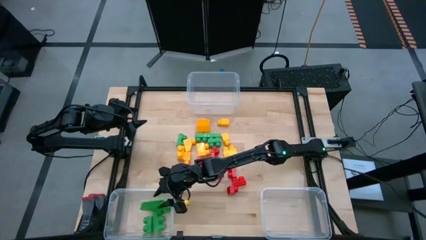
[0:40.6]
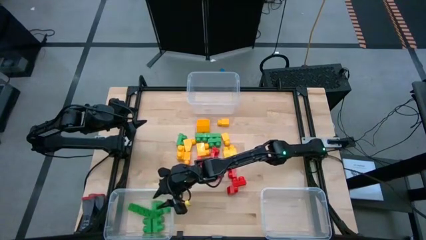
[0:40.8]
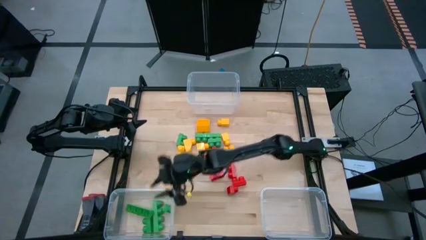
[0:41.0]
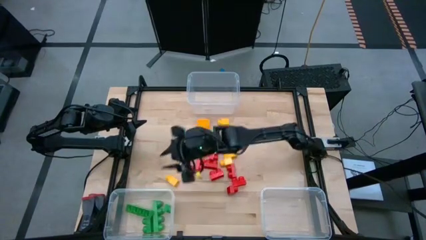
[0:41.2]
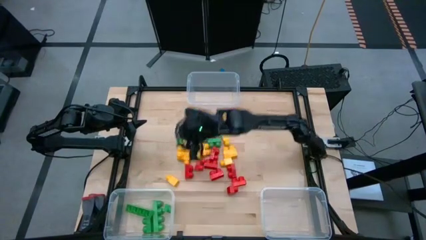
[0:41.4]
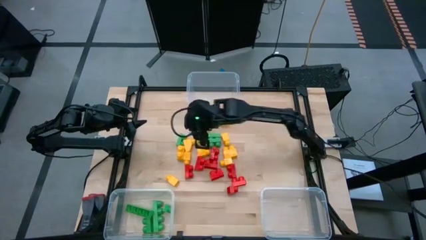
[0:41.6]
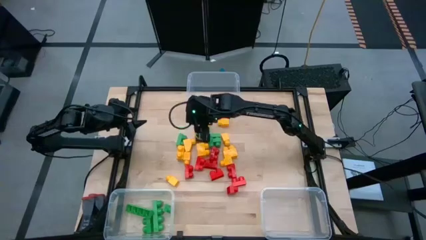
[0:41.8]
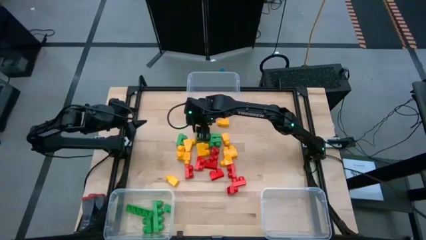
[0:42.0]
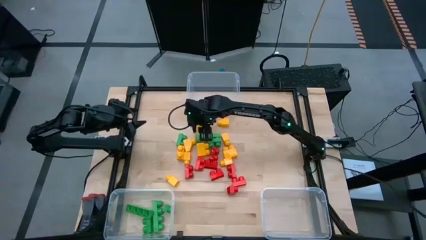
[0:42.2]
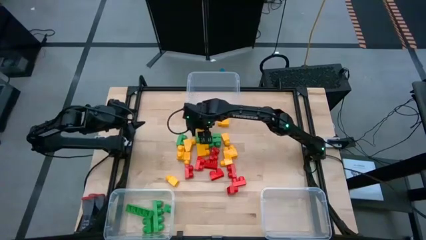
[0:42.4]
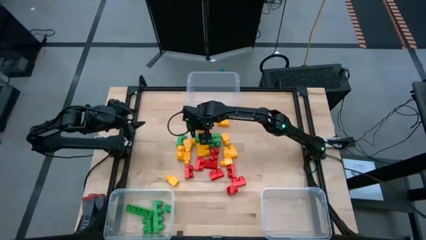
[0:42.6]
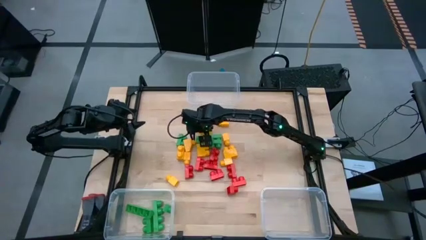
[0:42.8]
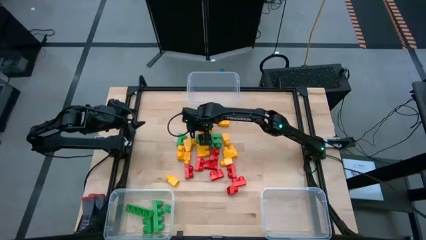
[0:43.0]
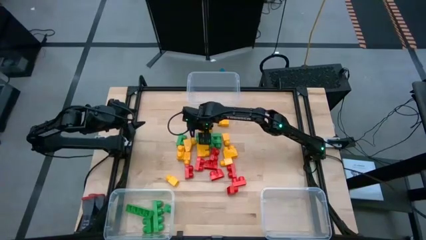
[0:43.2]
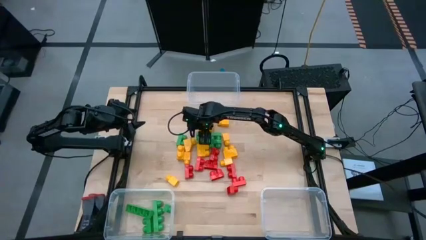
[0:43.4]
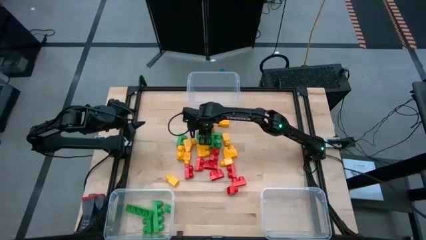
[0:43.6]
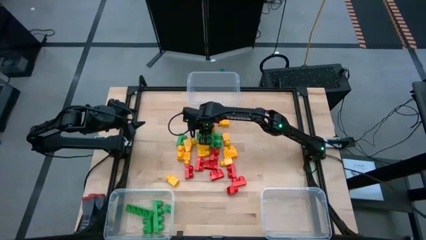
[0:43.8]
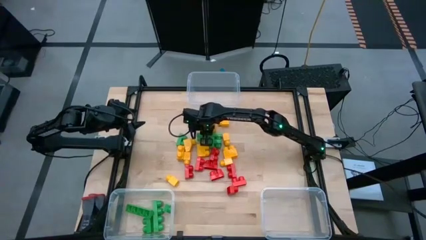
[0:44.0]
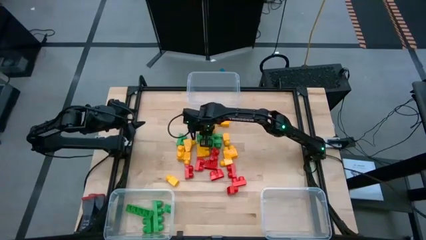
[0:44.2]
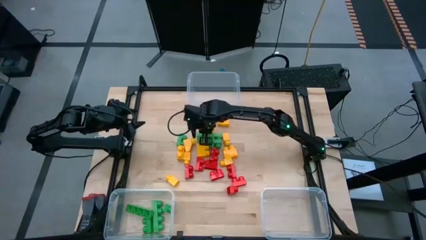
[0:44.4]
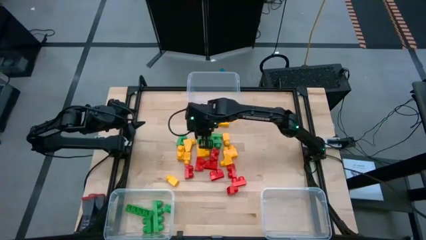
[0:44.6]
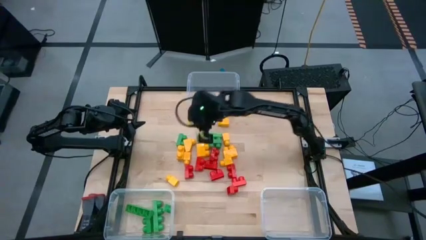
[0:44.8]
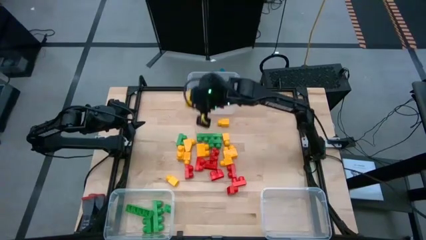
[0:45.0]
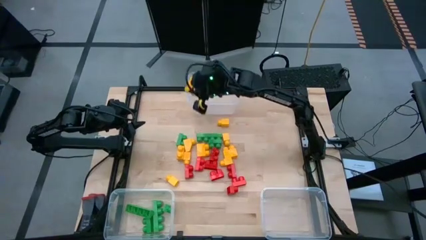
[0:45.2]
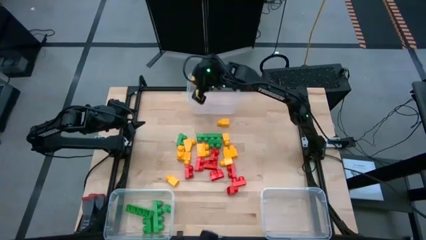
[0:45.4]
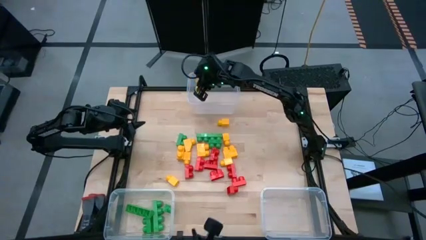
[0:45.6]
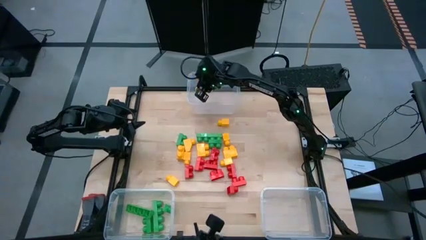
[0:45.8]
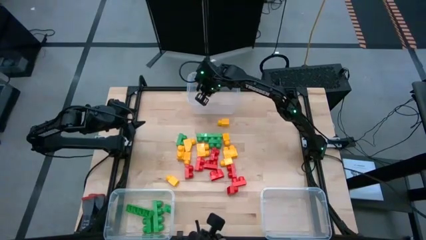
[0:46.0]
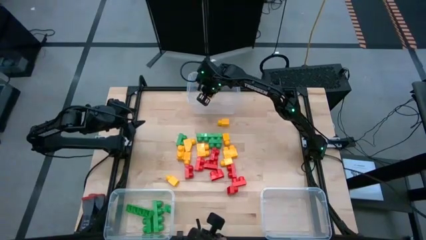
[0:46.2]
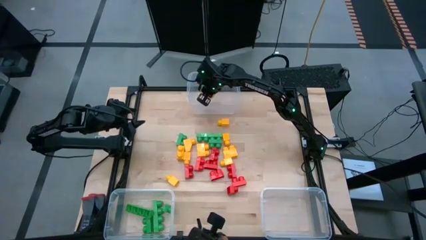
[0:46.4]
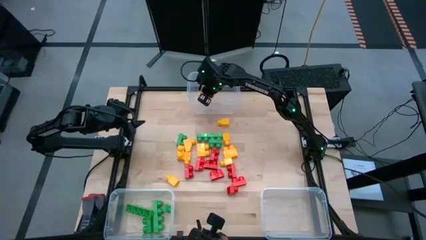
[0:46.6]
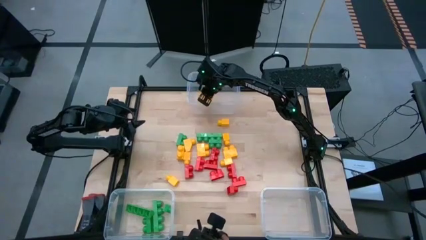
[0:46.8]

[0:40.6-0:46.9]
Task: Sort blocks
Put the yellow game piece into the top transparent bin

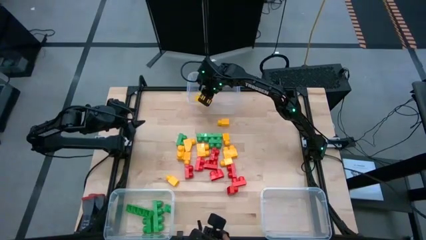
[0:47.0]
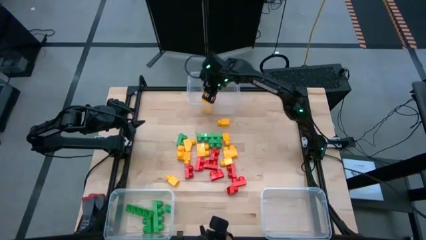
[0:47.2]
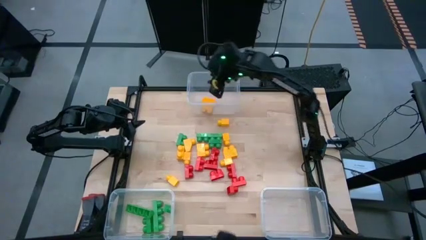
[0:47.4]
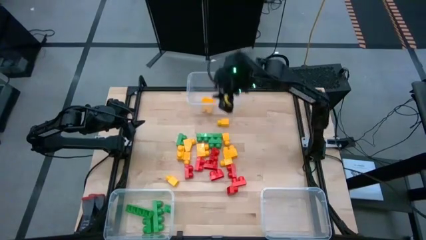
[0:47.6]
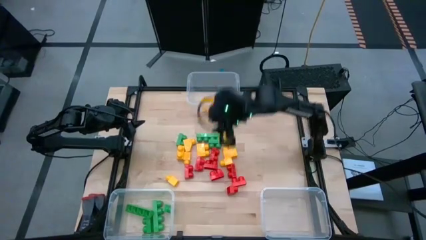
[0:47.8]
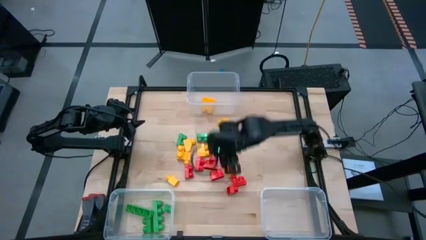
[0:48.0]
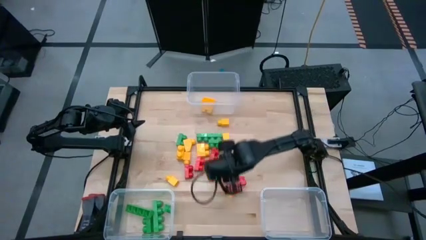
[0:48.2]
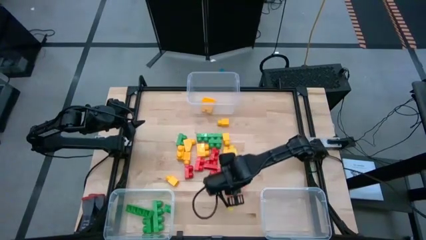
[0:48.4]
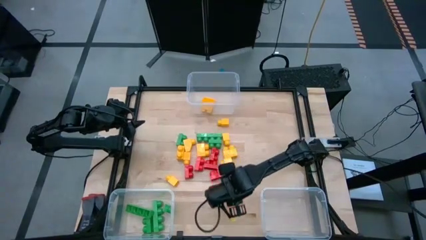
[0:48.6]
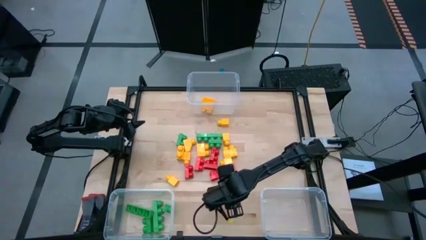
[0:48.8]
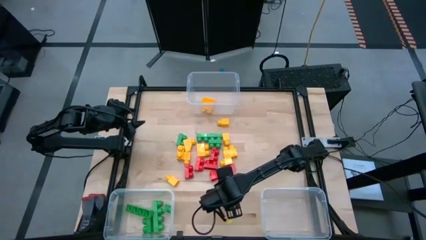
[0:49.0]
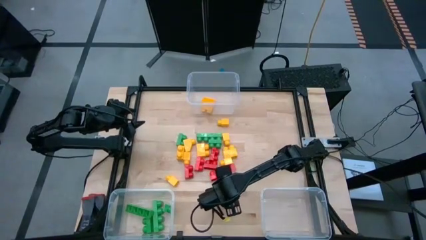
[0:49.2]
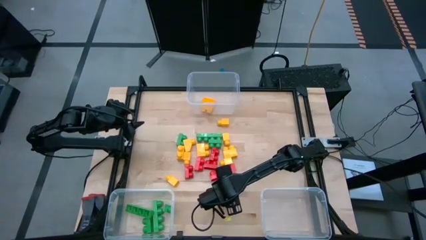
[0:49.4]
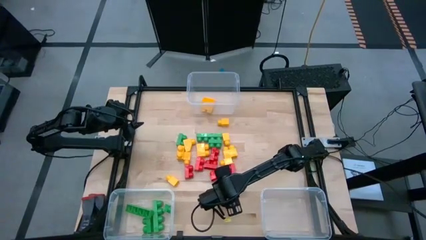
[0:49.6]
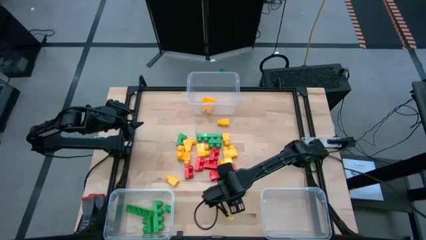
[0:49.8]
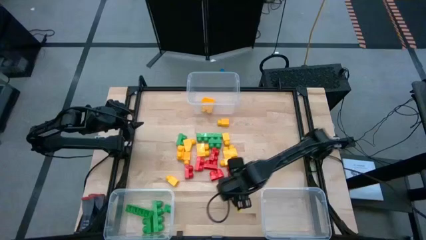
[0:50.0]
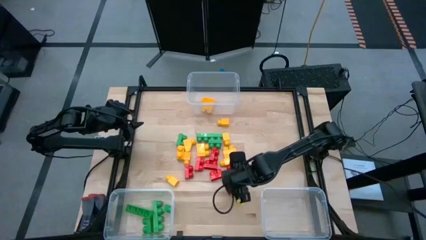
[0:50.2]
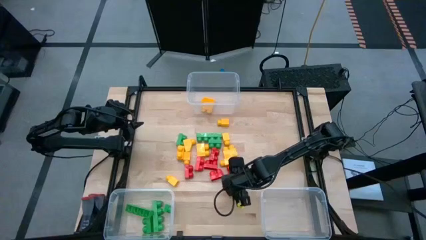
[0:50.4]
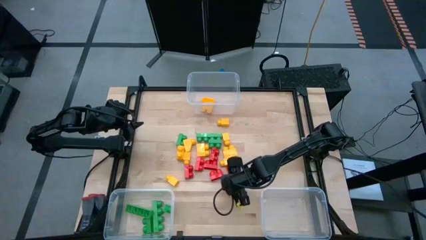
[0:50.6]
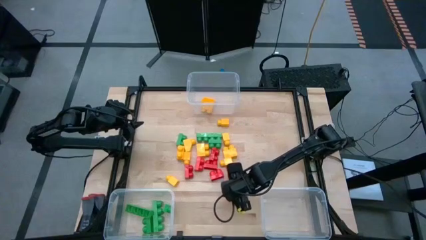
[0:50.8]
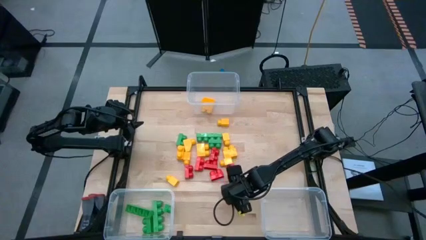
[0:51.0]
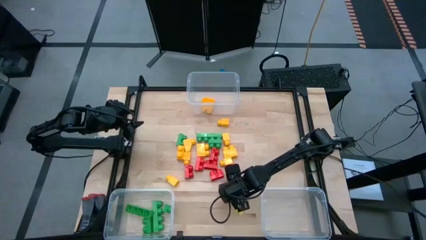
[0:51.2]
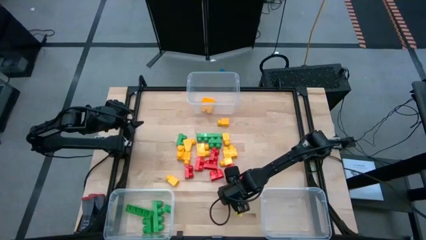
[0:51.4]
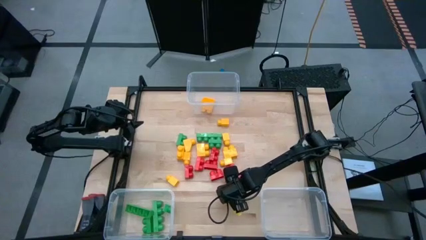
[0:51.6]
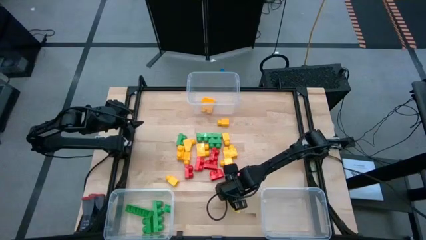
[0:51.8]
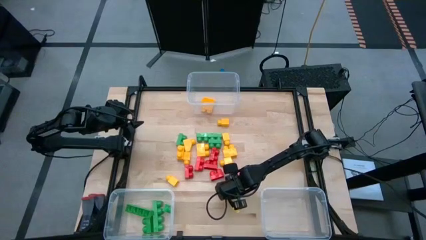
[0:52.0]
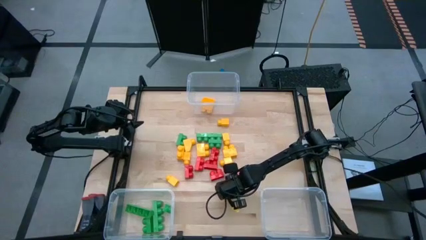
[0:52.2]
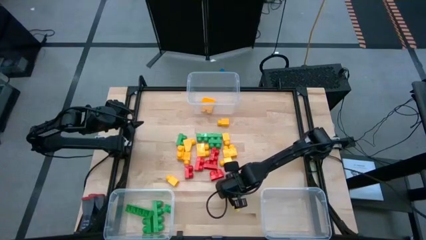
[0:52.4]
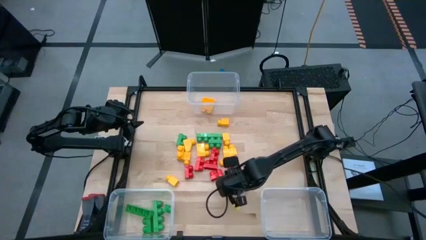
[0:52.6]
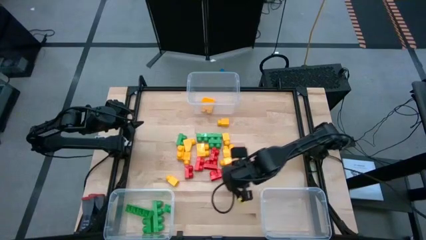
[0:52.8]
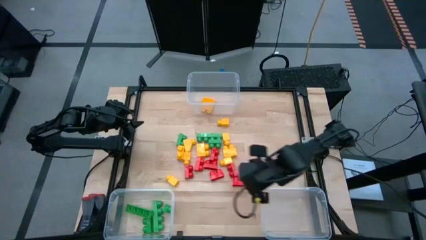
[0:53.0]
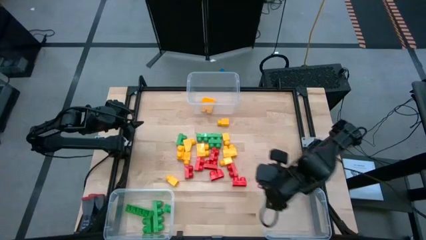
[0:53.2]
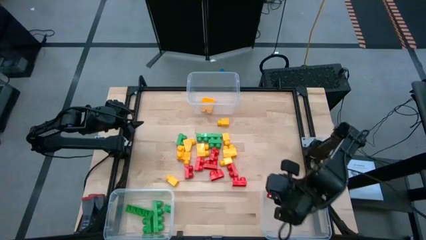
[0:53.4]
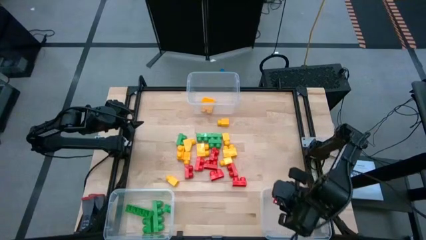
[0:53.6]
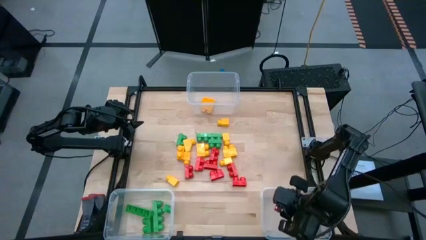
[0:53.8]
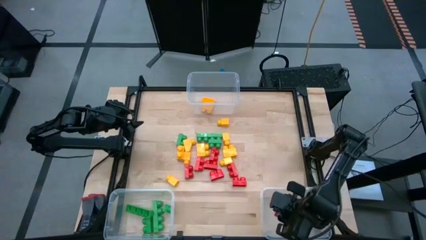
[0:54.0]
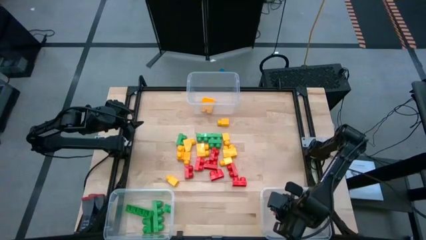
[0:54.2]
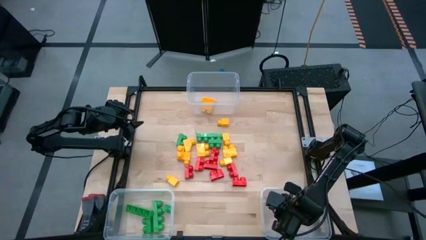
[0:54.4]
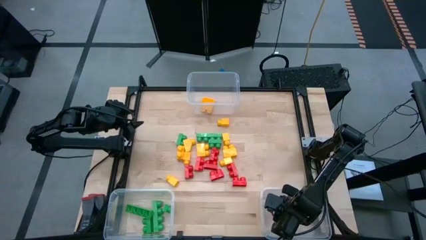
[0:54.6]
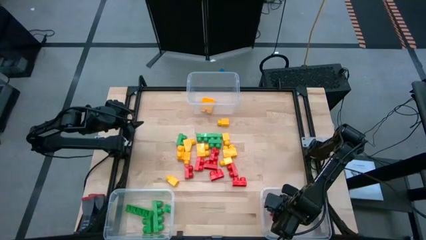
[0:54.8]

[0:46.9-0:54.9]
Put the red game piece into the bottom right transparent bin

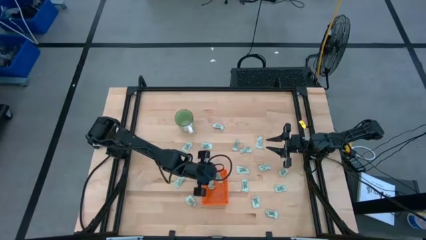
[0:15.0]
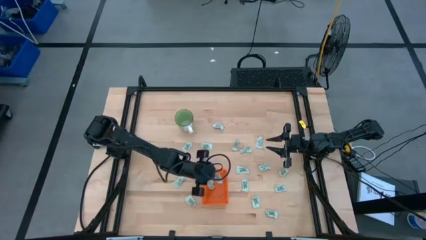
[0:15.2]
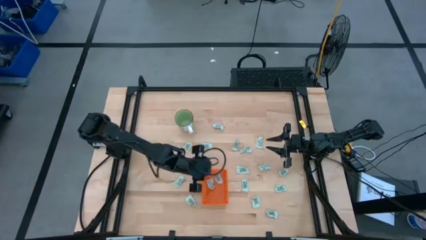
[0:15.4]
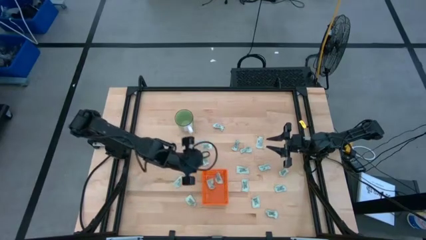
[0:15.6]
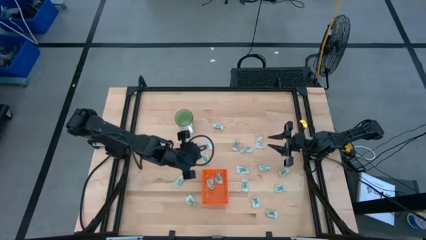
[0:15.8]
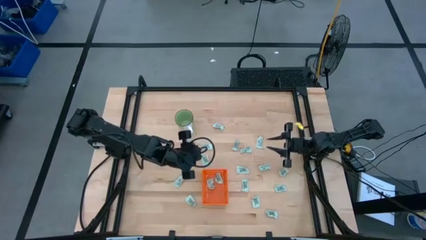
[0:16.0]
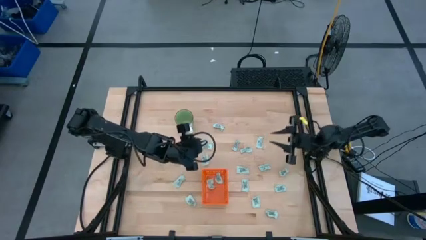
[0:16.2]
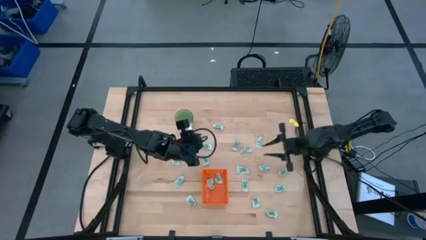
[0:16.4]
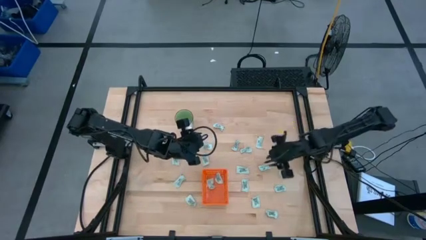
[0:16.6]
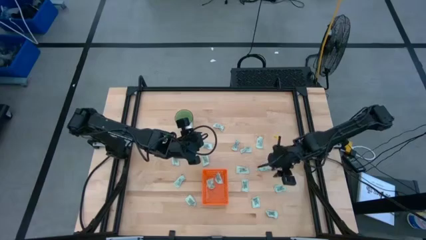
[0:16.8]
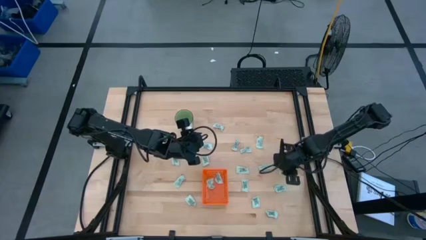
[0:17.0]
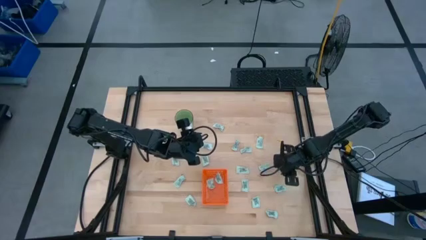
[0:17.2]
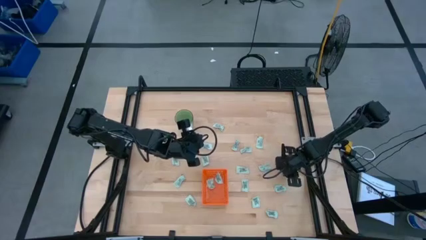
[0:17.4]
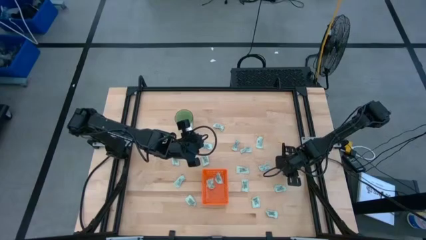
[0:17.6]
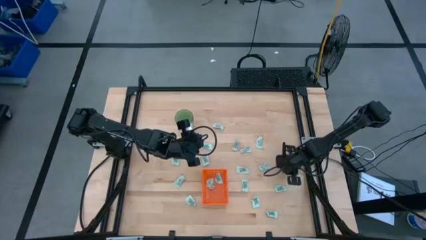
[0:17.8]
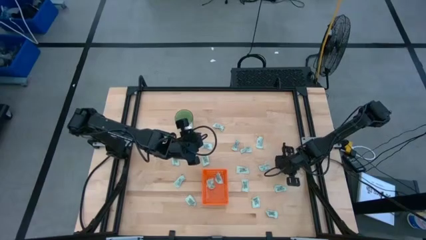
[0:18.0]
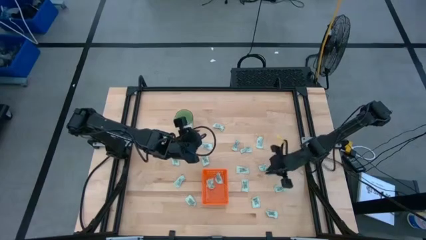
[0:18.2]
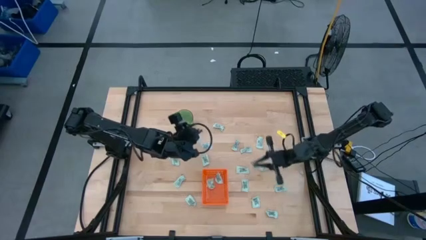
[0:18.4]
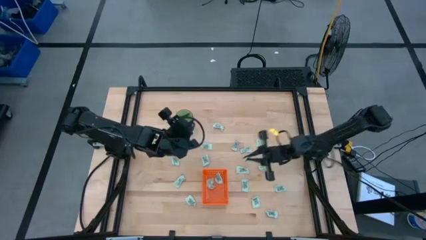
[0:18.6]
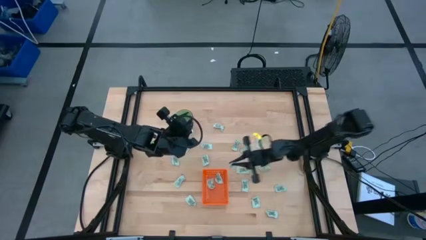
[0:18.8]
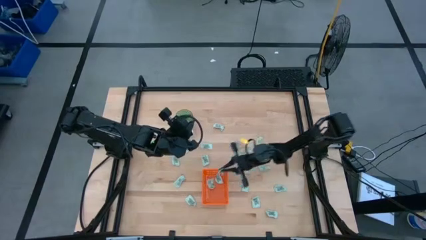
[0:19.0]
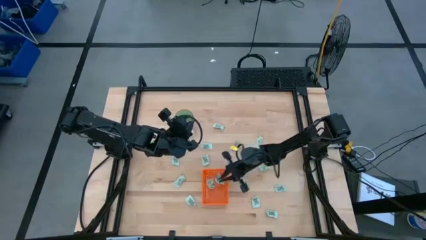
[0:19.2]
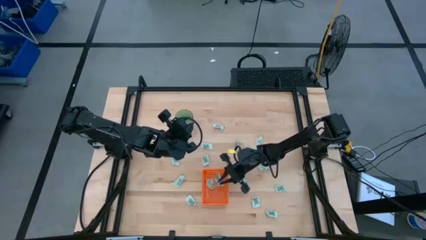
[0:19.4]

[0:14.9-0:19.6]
Task: Pick and place Stevia / Truvia into bins
Put the stevia packet into the orange basket
